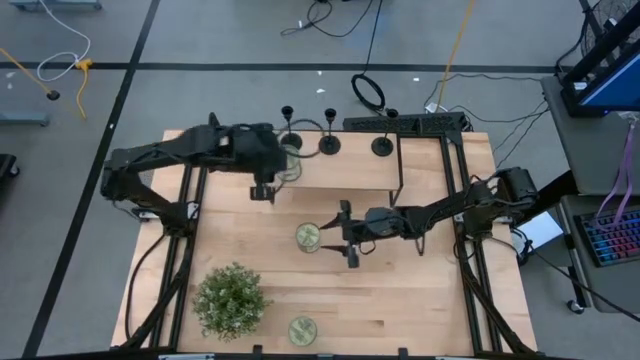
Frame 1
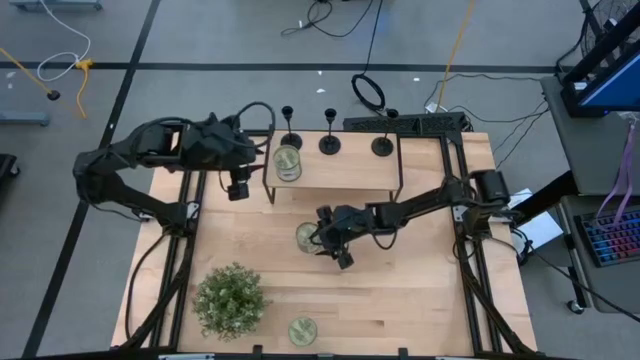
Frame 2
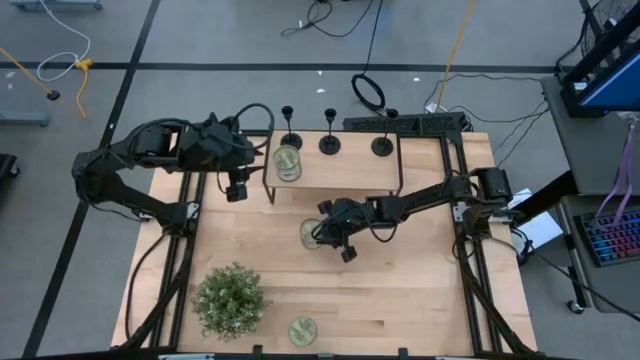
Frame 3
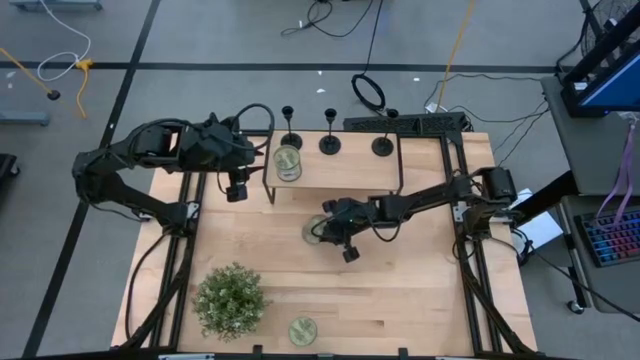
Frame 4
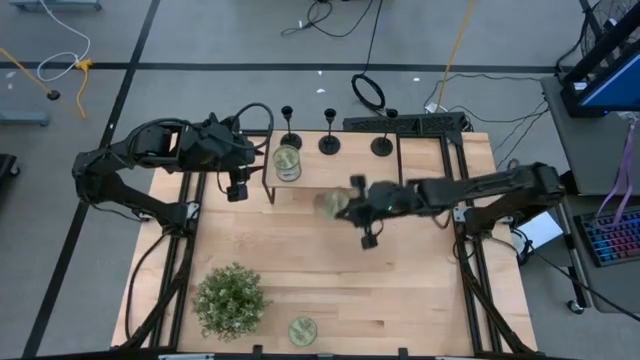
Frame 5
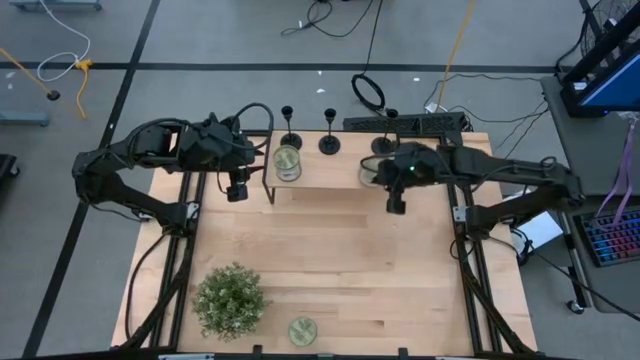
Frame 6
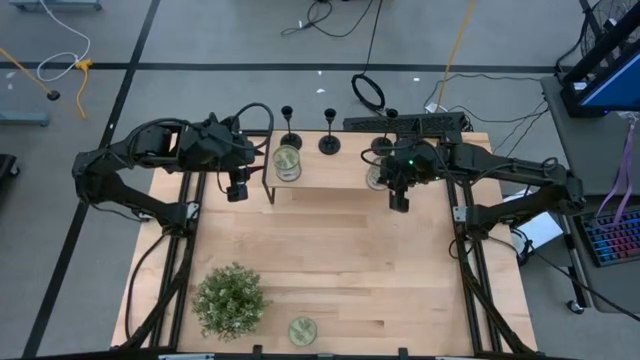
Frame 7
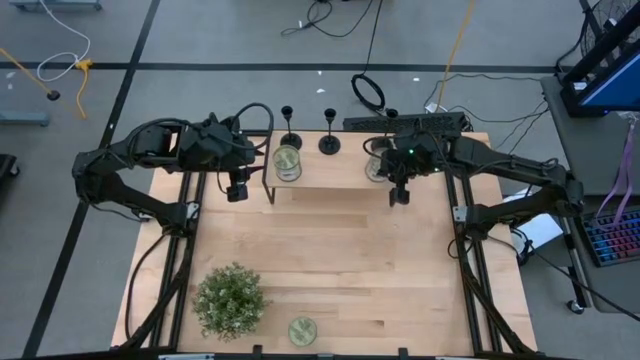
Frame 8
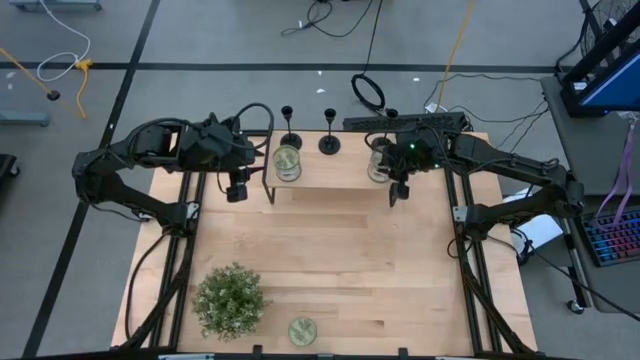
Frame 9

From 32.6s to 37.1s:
Task: Pick & Place candle stick holders
Put the top green scented candle on the shelf

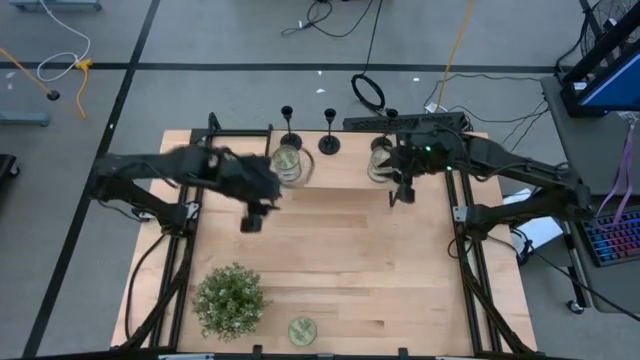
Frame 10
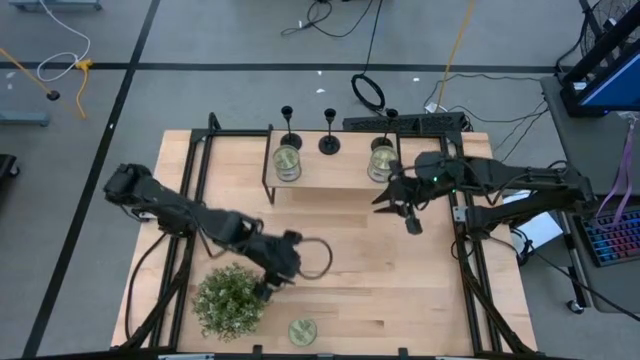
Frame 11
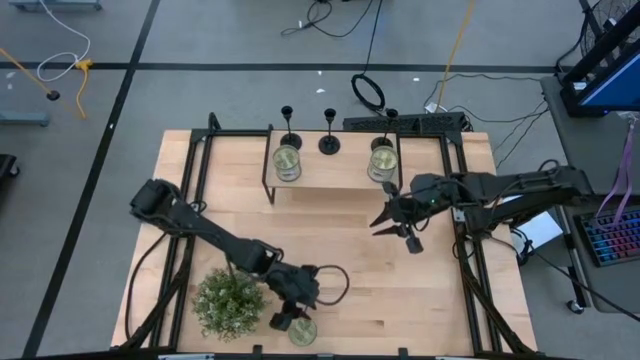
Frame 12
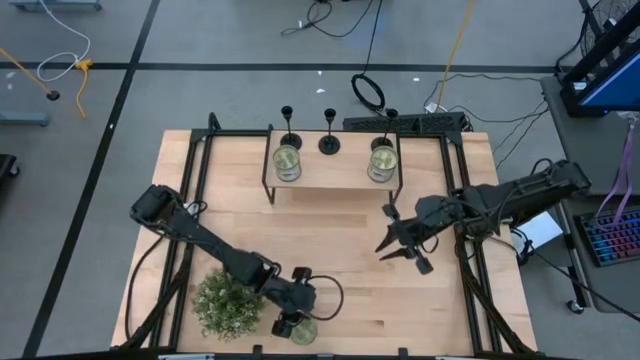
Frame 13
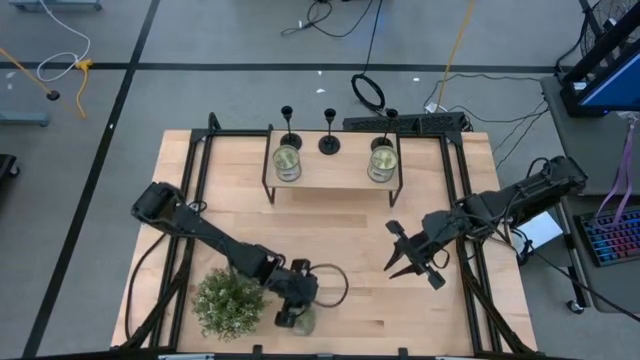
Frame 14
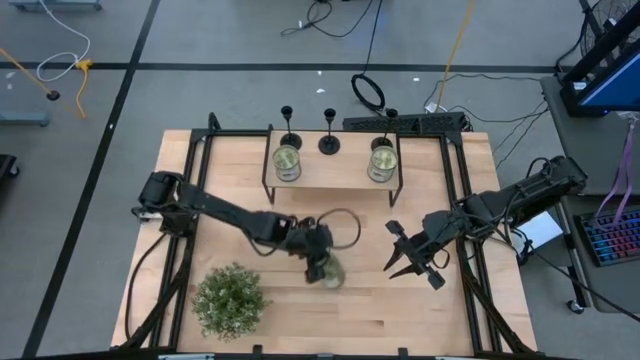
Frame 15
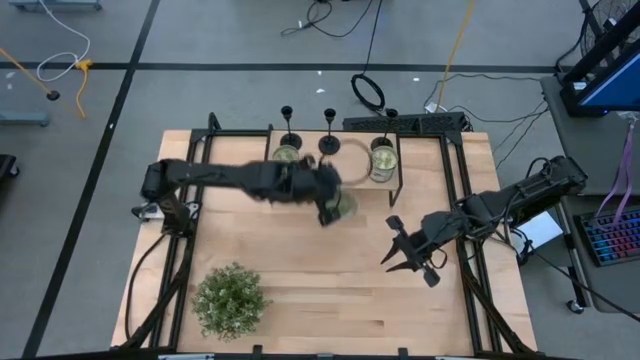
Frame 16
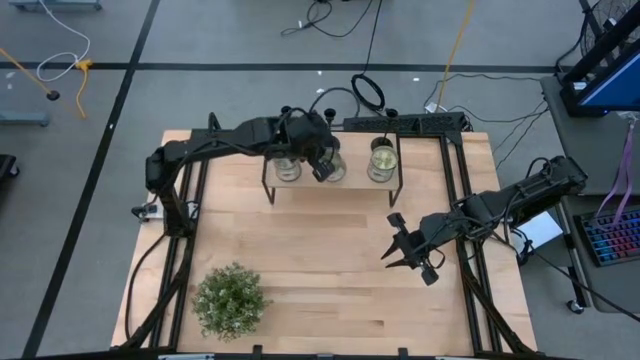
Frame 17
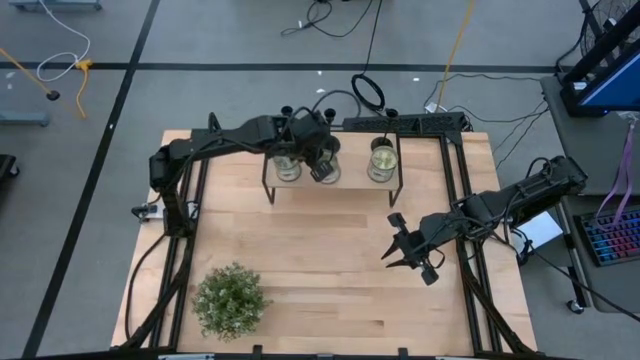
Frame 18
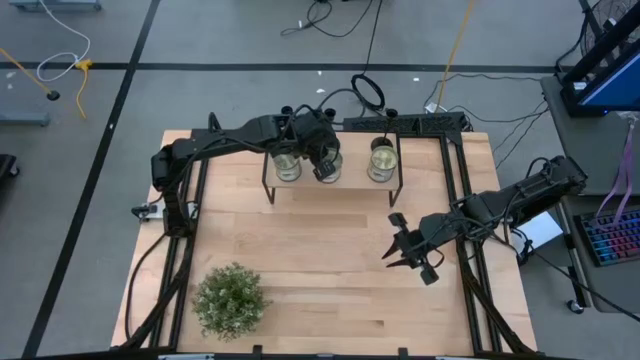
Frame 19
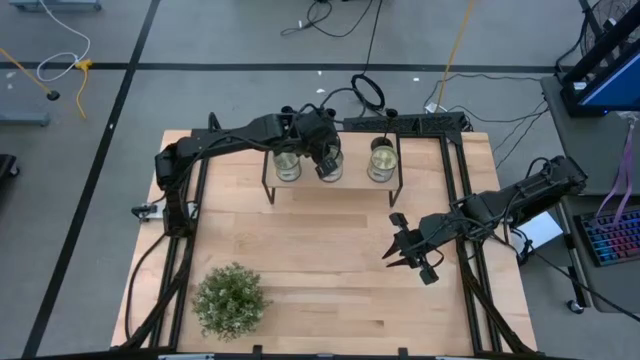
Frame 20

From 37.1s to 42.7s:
Put the green scented candle on the shelf

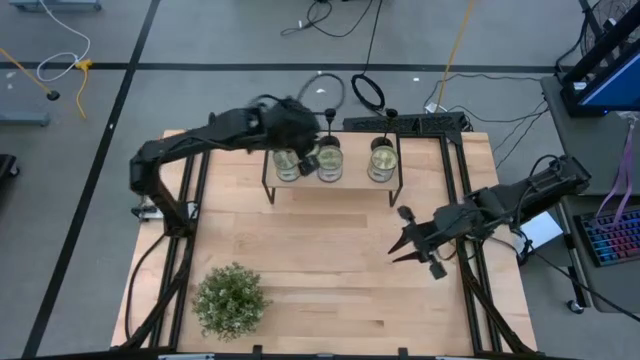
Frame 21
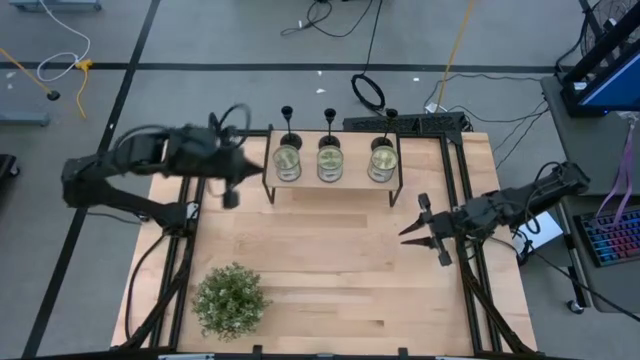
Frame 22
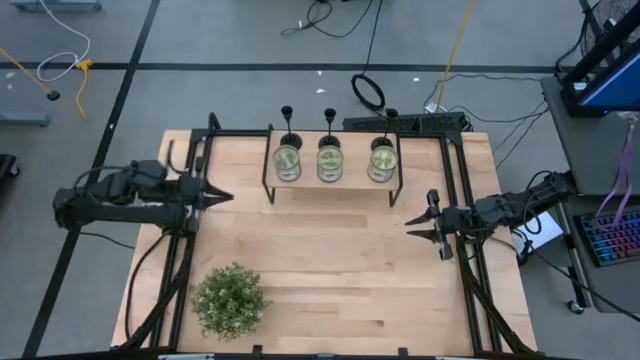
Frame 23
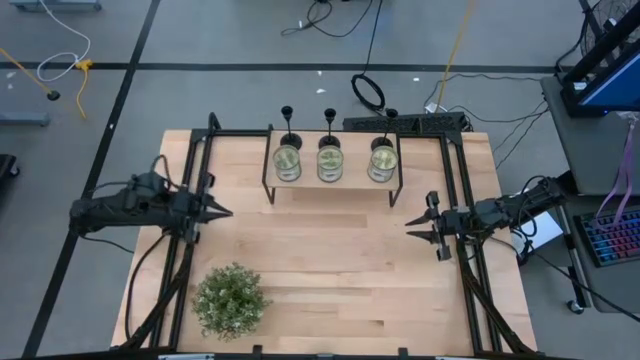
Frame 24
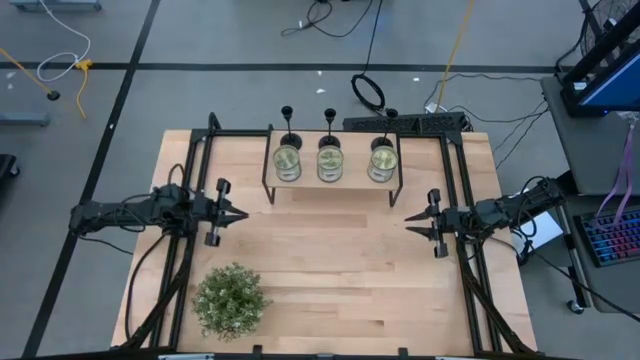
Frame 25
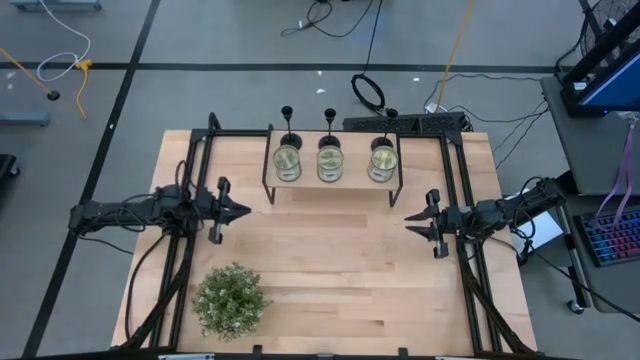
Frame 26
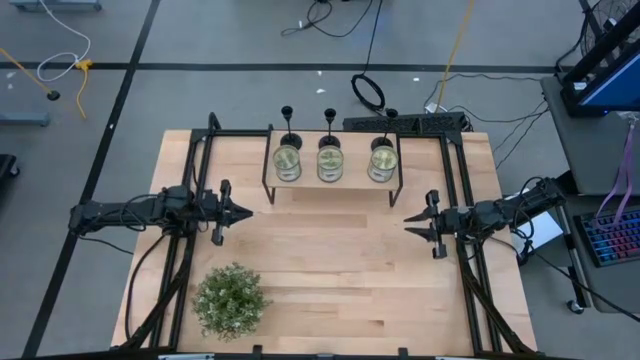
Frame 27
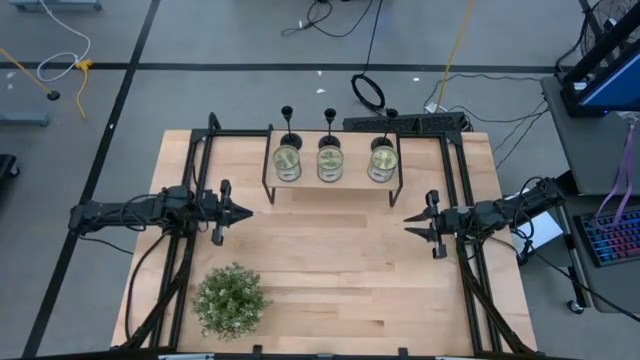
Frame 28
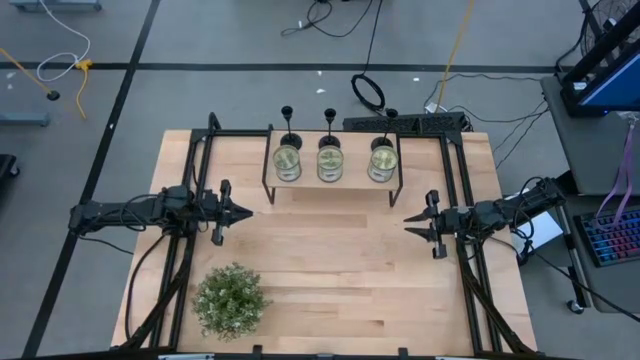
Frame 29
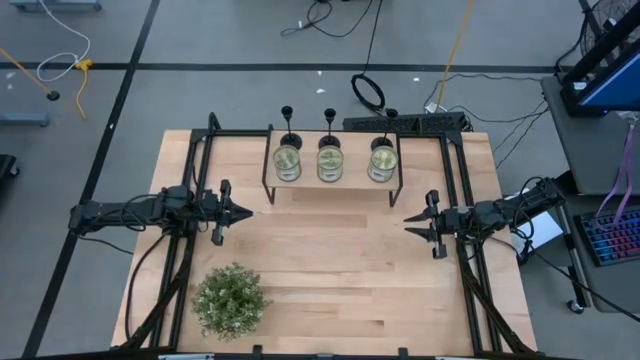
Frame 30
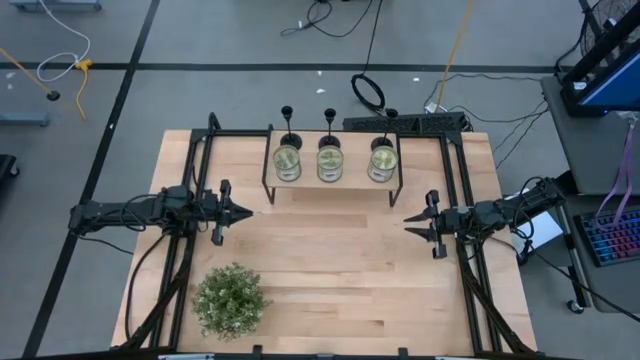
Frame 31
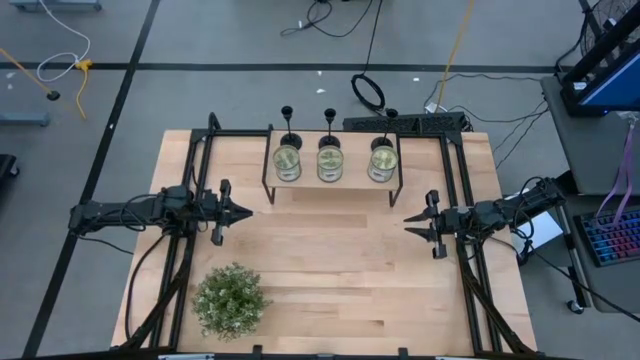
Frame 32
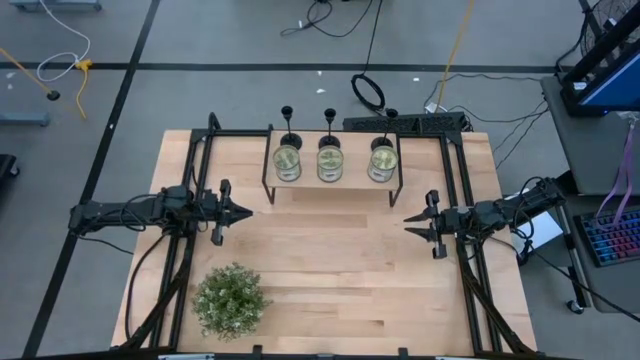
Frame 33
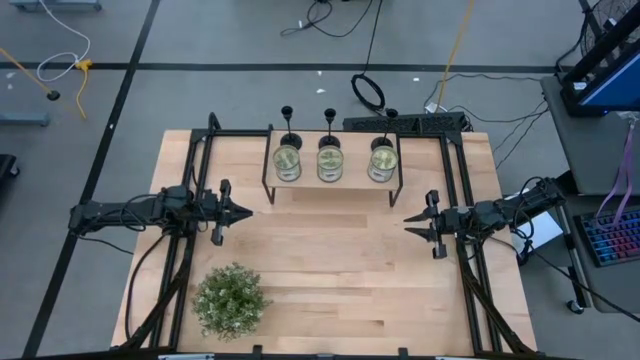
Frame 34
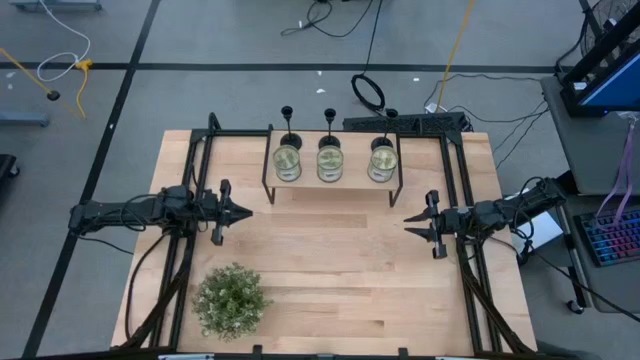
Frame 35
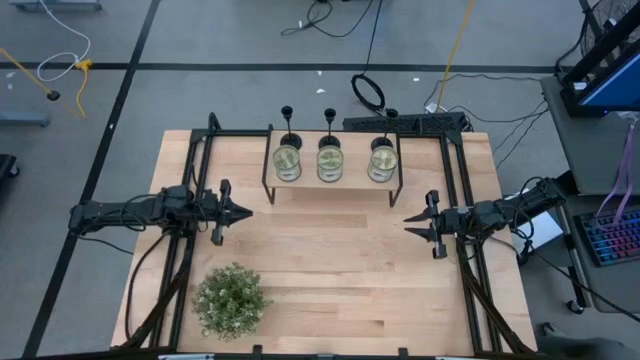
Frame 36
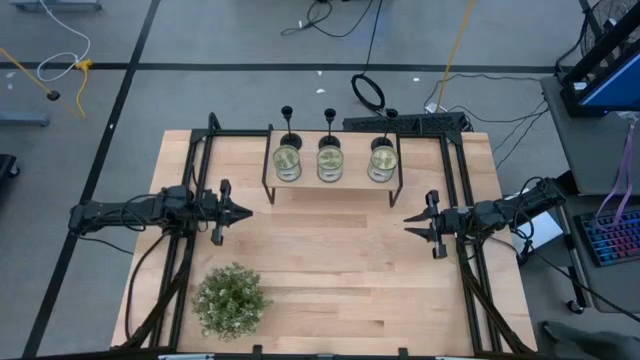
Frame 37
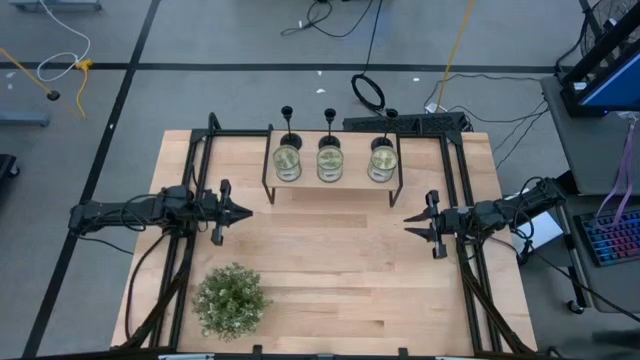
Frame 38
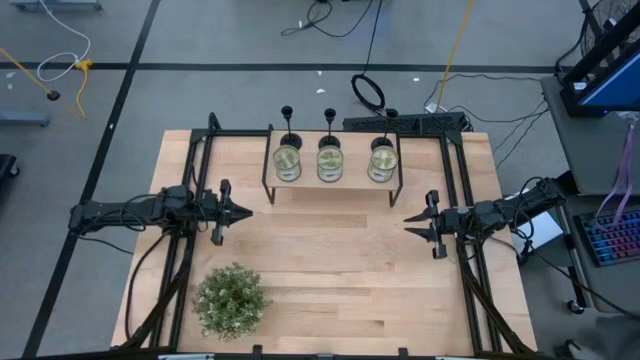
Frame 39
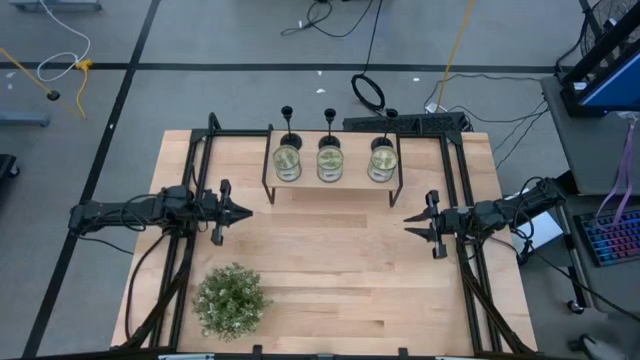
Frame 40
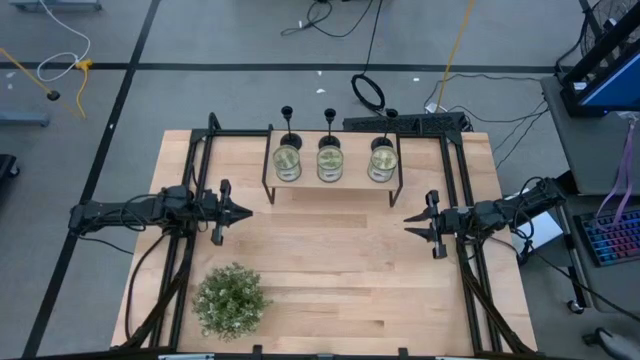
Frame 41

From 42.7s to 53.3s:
Return to Home Position
